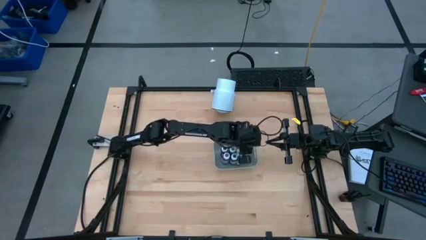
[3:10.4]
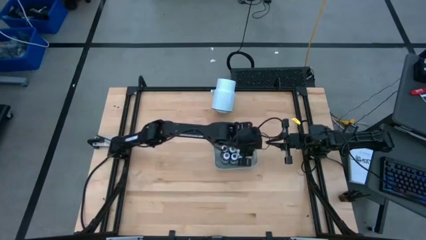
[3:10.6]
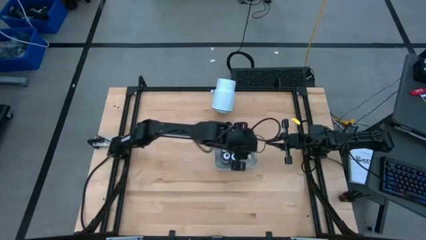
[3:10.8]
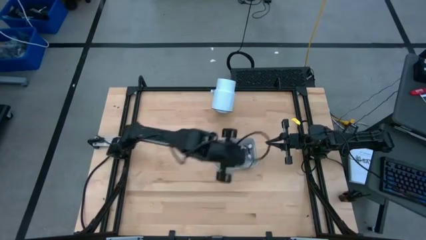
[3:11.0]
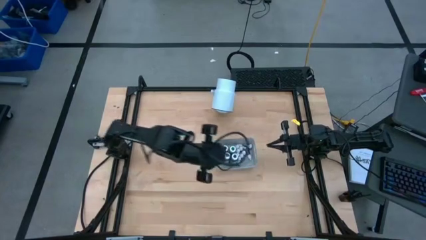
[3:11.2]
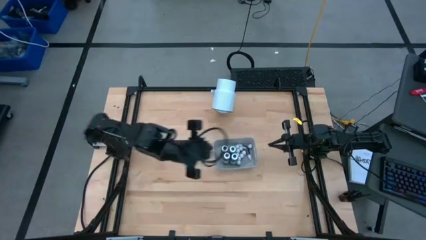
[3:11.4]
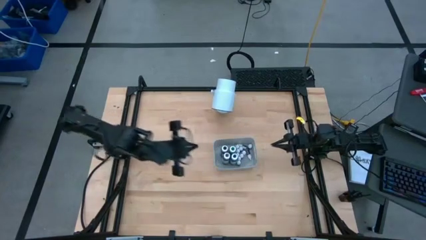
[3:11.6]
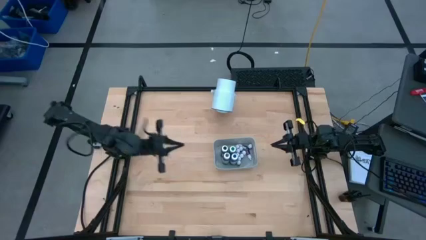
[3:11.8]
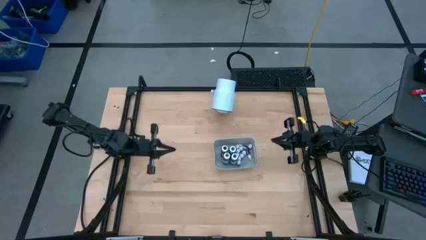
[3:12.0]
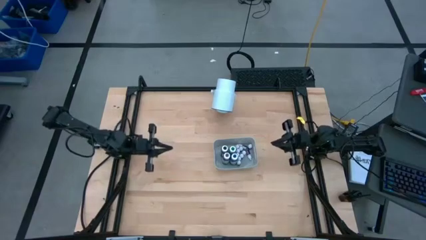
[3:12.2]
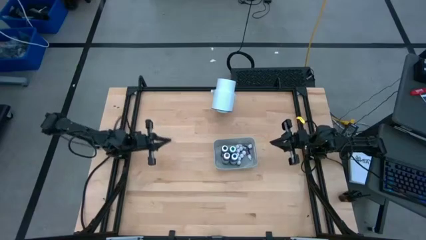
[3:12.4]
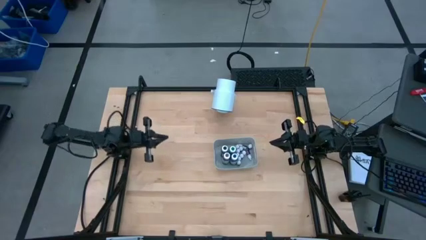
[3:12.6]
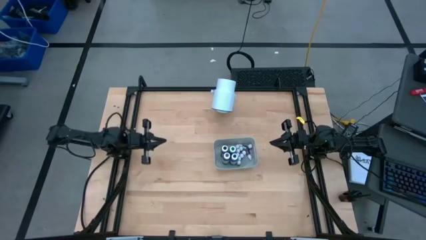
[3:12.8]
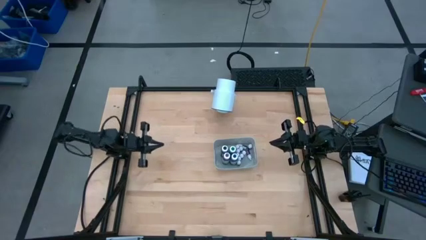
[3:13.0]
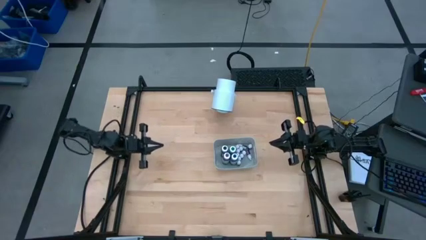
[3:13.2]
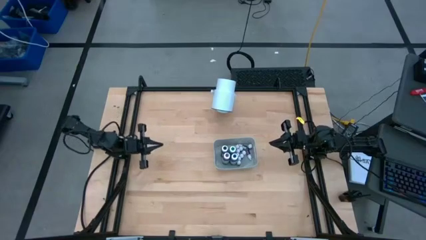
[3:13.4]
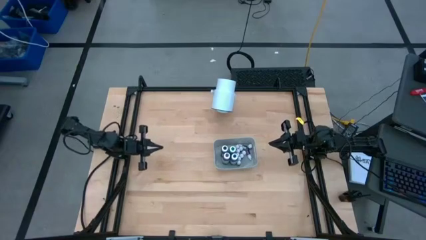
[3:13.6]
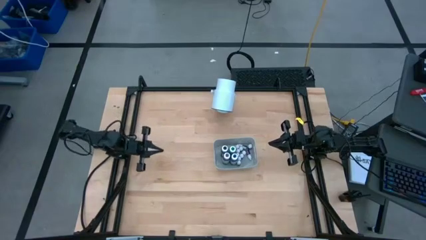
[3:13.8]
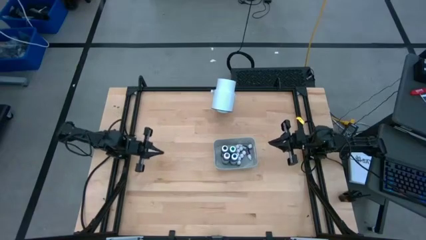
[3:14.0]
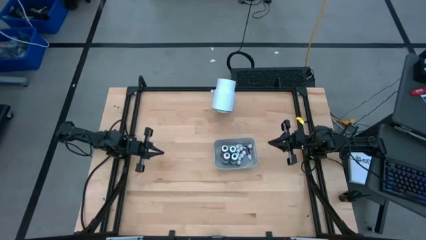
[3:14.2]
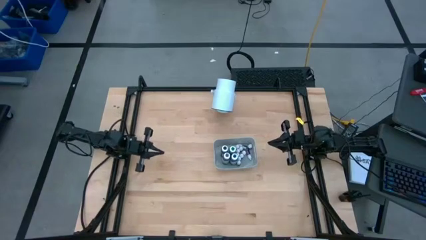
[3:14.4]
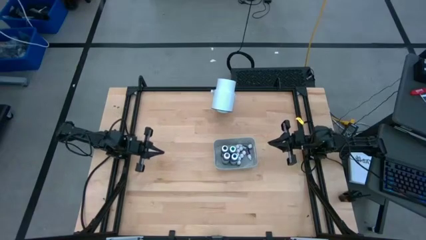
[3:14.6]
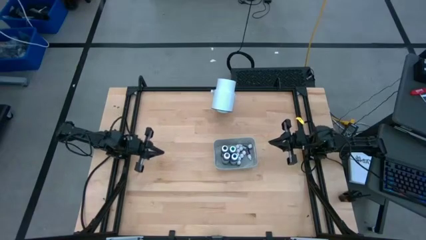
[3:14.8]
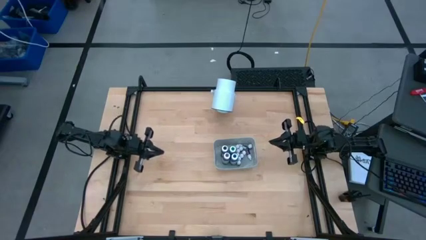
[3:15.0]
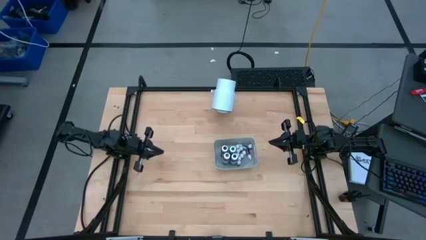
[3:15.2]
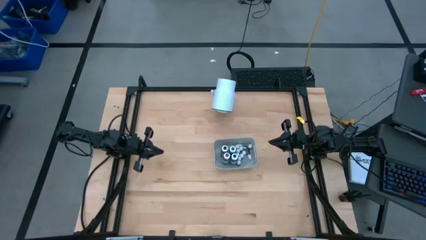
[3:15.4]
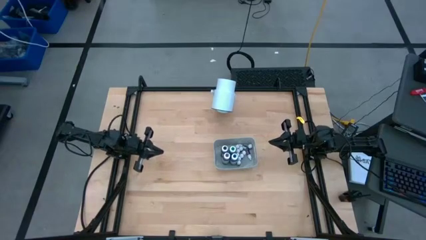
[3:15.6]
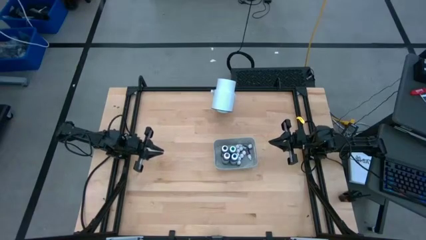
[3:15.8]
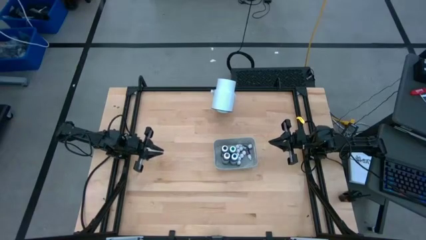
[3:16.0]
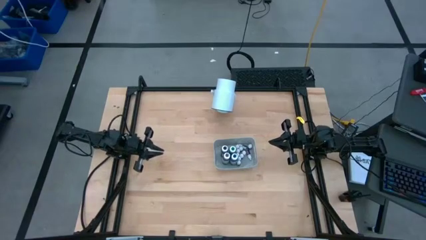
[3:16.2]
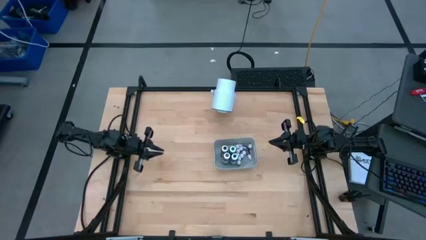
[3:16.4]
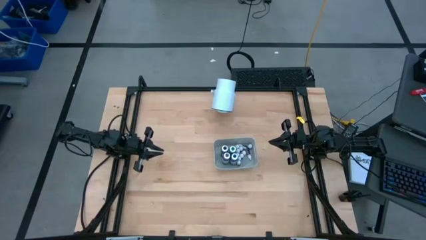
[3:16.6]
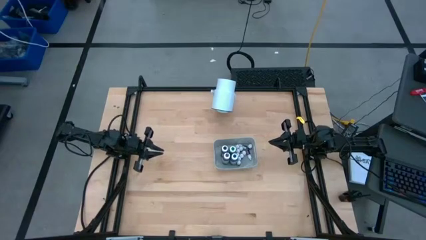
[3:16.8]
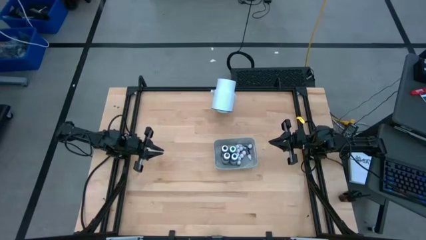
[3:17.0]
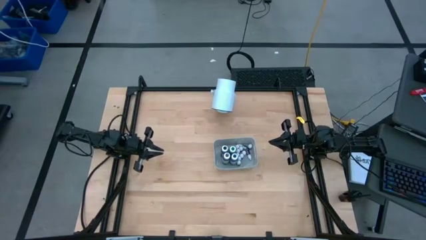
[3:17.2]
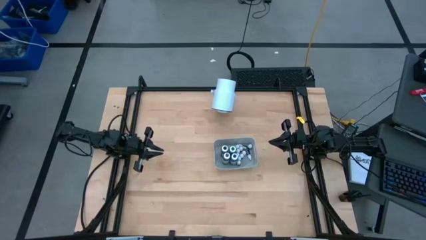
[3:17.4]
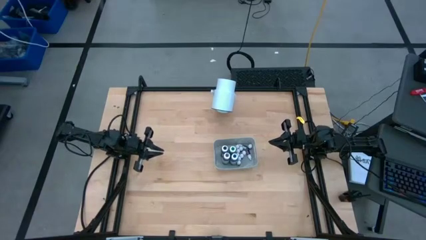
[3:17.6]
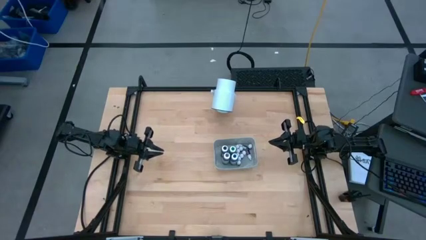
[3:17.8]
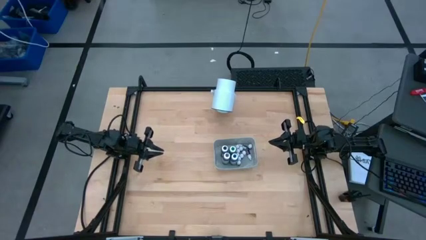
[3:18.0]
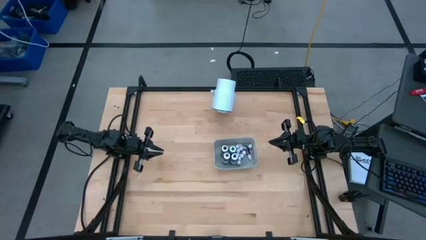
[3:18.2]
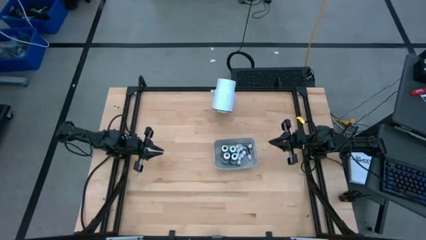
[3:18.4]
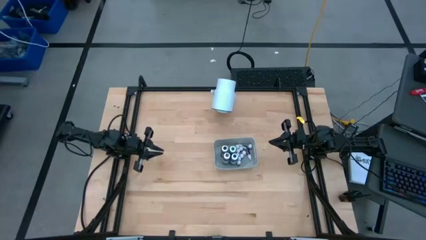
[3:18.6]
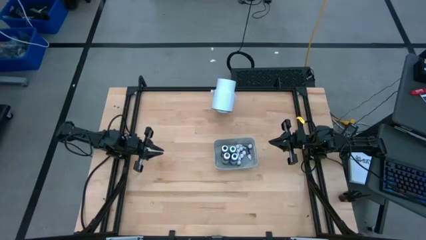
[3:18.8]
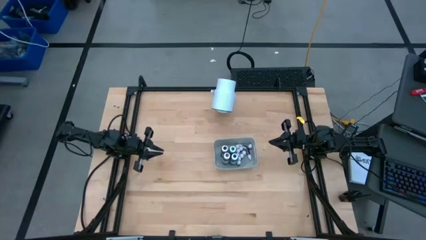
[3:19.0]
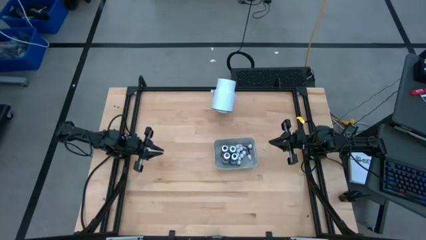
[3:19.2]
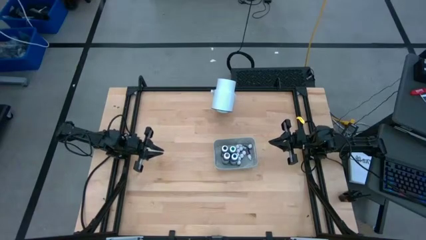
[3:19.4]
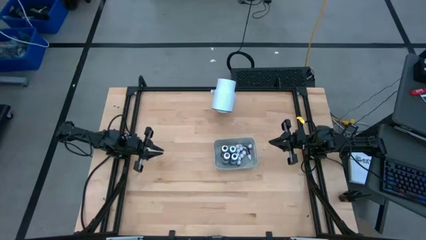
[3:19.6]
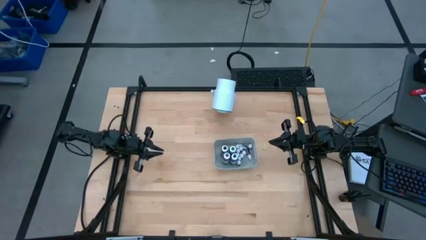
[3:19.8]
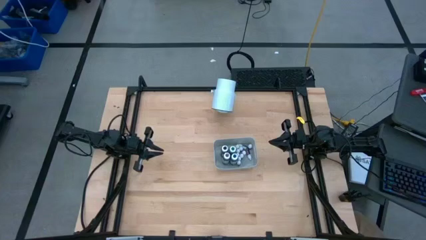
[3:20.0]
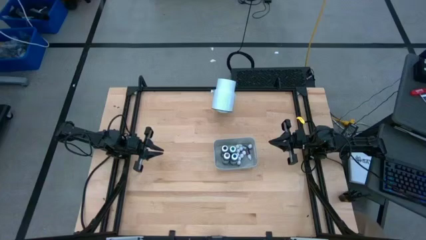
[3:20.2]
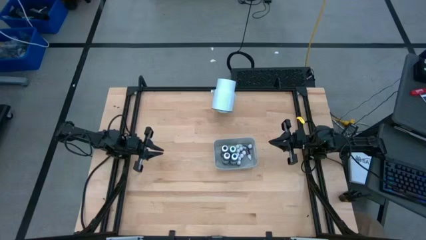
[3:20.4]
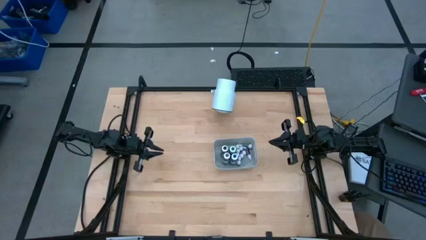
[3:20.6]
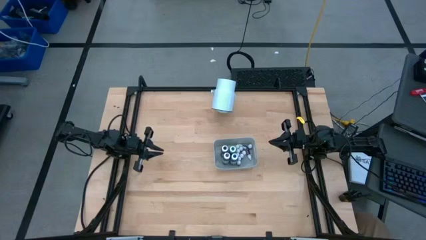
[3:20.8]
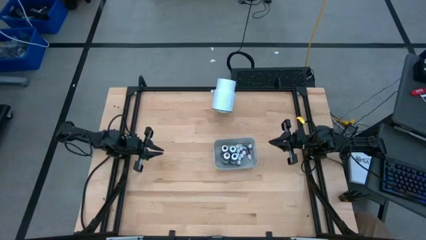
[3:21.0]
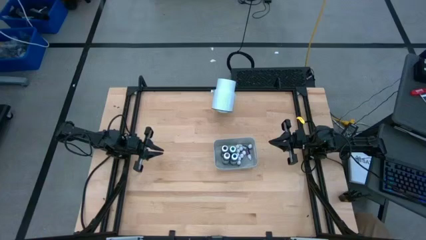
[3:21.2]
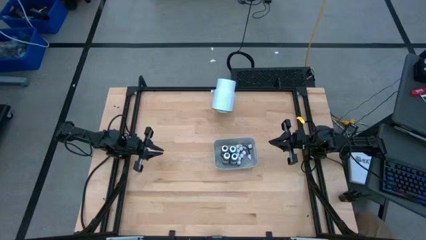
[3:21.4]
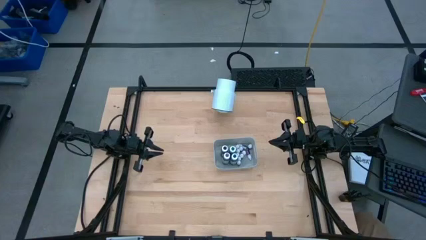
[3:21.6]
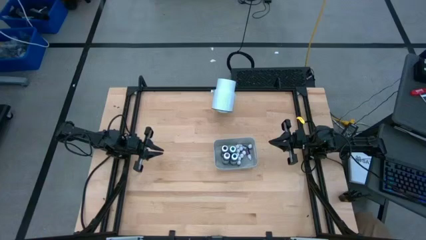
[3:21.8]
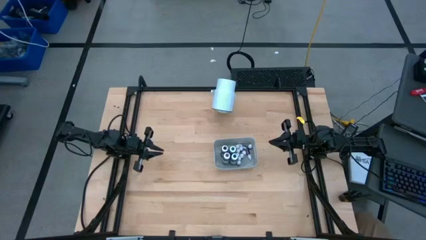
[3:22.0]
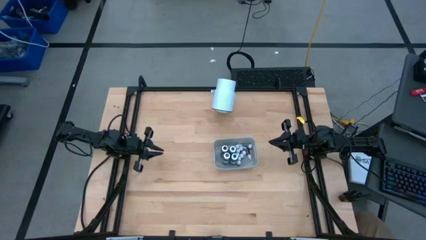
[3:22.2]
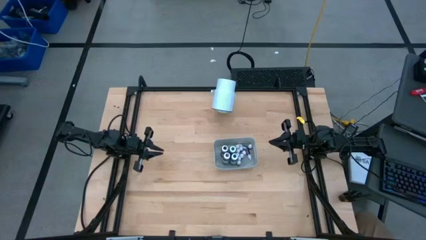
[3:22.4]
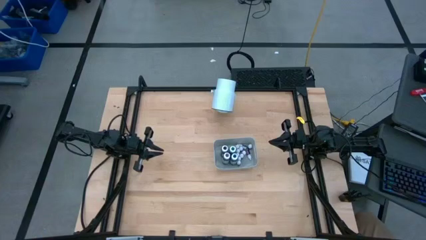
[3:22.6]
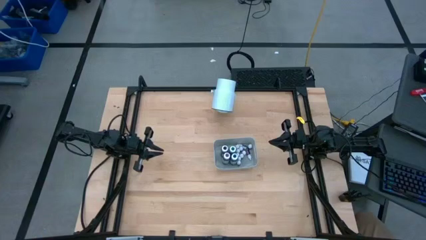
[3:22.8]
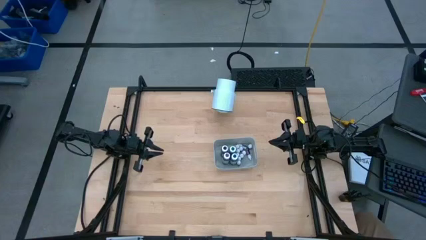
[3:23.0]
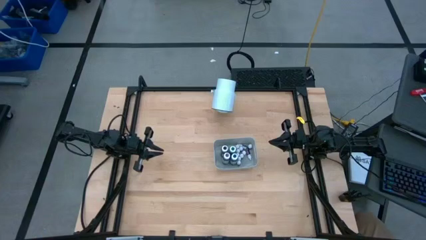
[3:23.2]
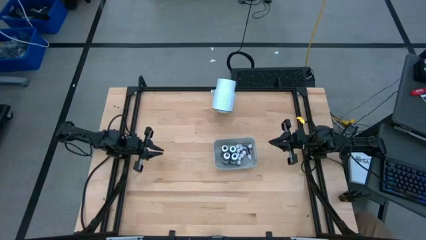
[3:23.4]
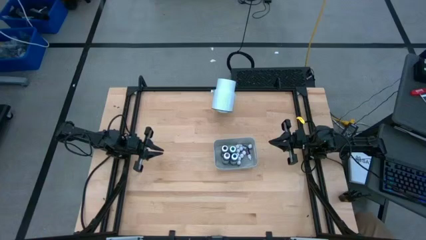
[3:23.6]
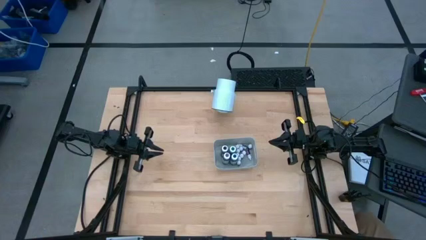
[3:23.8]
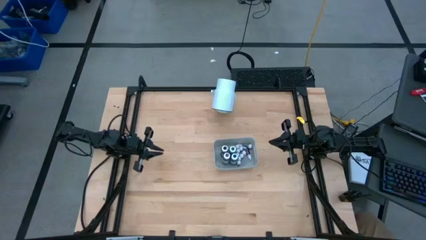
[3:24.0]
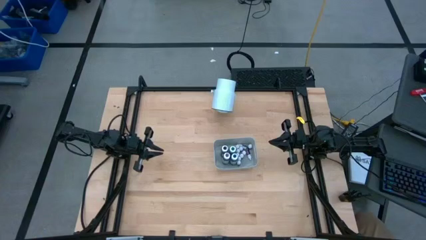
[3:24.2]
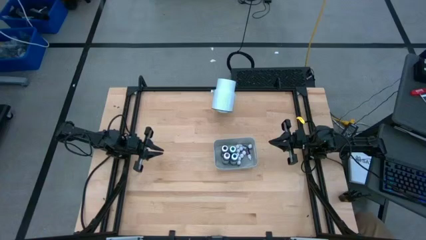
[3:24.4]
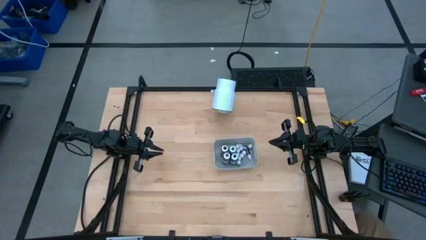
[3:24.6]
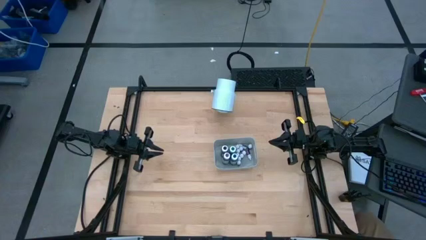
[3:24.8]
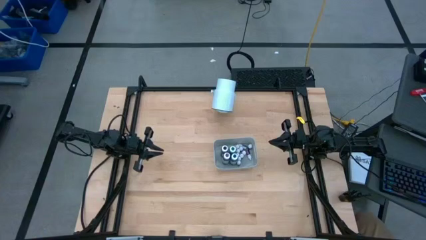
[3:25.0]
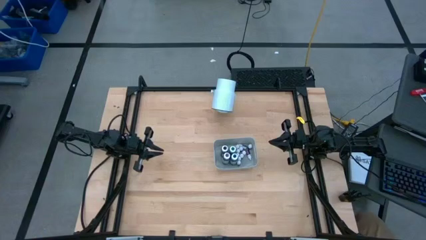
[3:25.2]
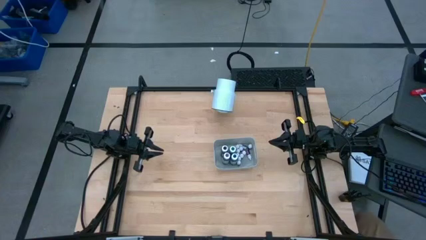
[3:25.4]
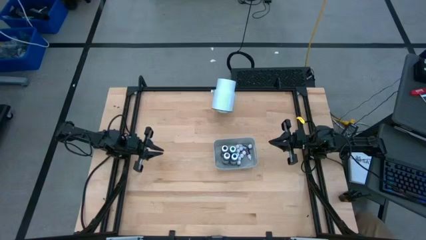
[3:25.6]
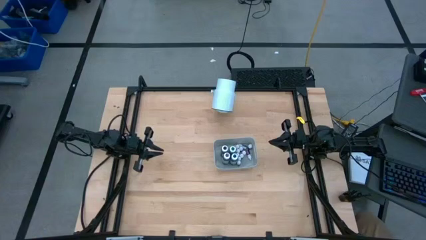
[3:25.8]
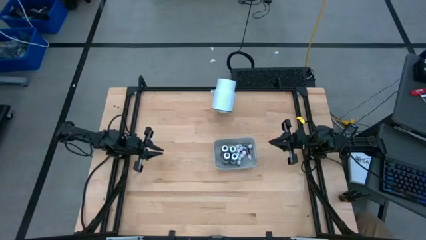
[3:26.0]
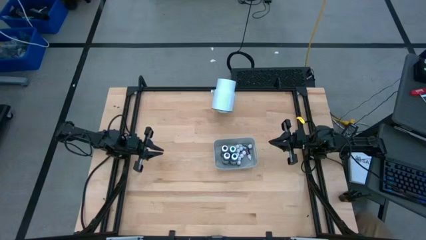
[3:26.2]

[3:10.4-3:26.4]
Task: Pick & Place food coloring
Return to Home Position

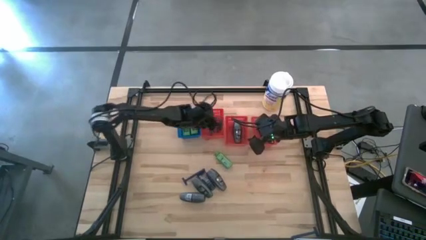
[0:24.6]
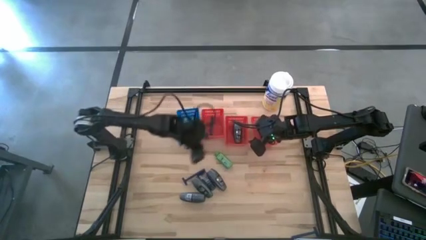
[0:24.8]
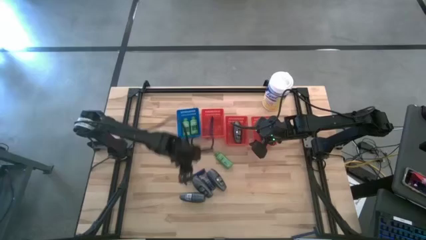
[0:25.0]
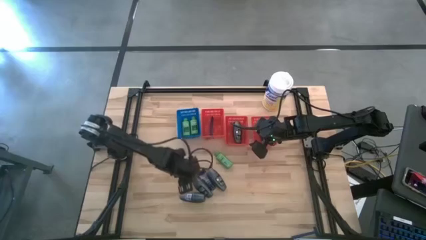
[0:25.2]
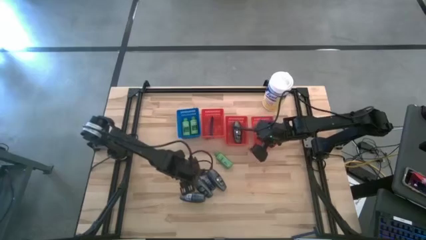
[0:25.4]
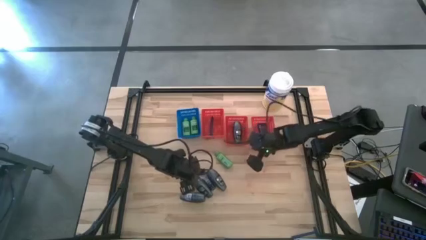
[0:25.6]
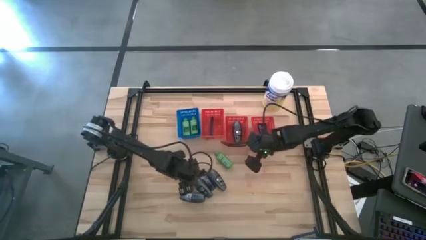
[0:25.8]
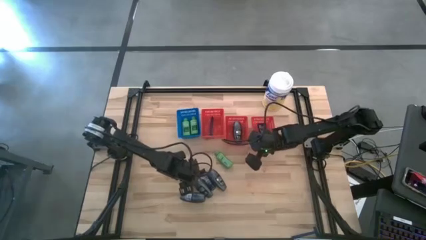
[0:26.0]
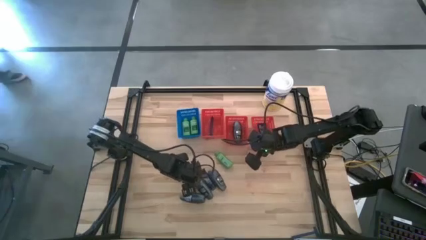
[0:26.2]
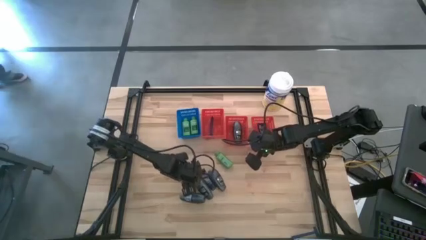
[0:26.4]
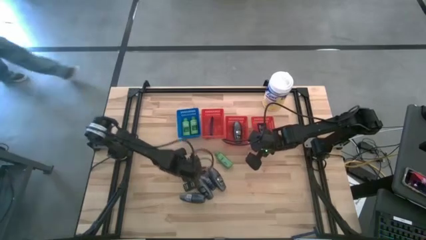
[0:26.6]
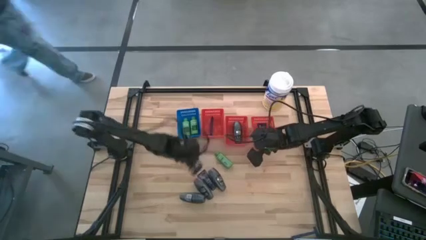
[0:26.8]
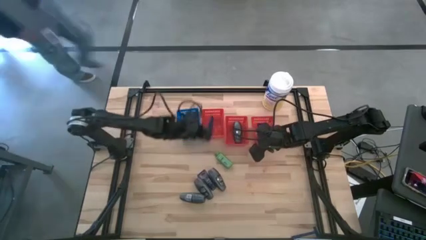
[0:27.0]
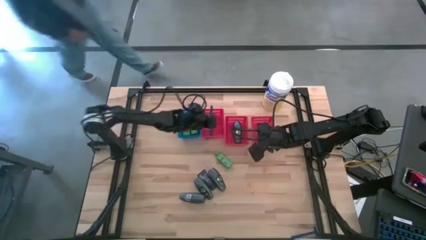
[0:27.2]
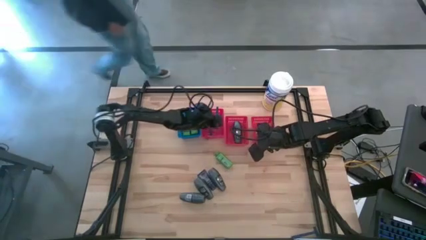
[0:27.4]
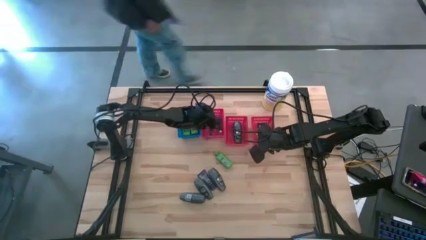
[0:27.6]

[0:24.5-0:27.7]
Task: Pick & Place Travel size toiletries
Put the blue razor into the left red bin
